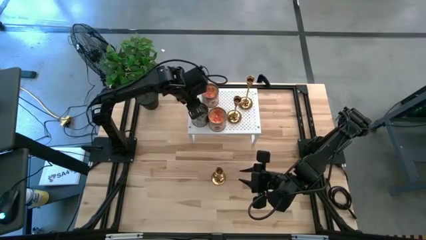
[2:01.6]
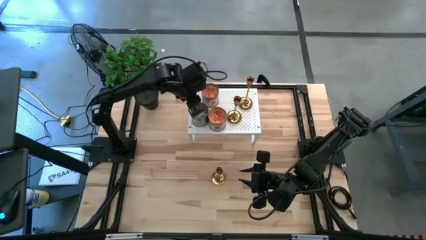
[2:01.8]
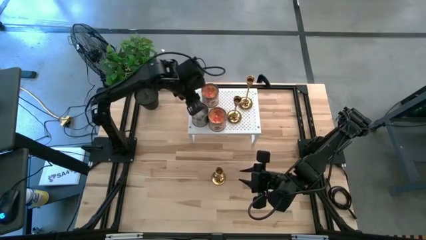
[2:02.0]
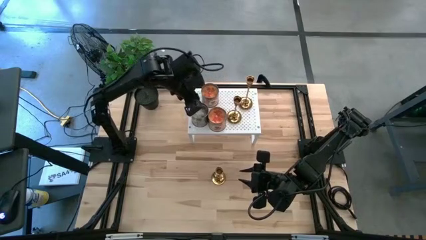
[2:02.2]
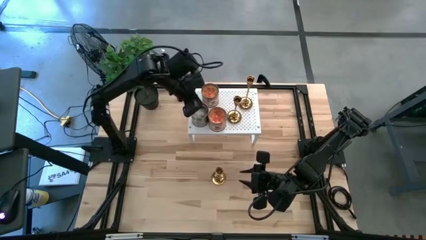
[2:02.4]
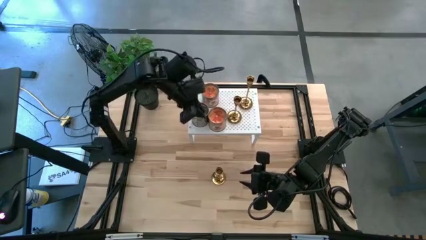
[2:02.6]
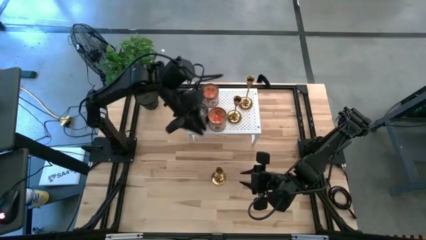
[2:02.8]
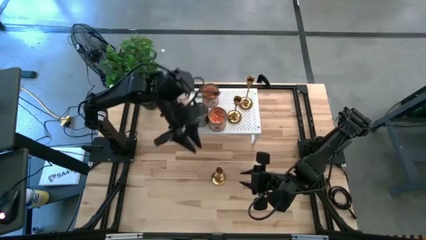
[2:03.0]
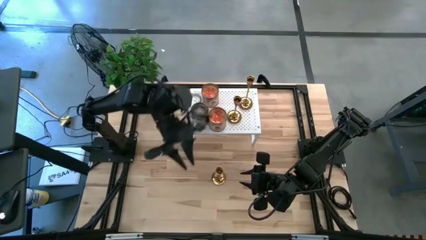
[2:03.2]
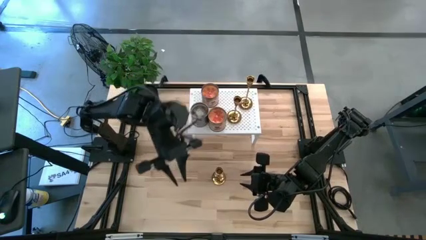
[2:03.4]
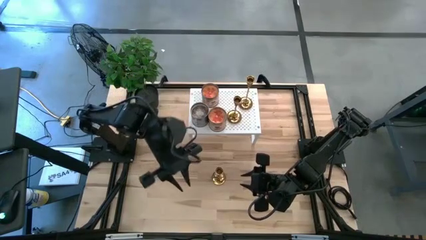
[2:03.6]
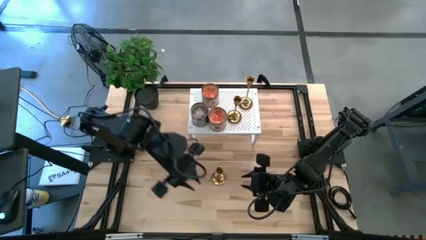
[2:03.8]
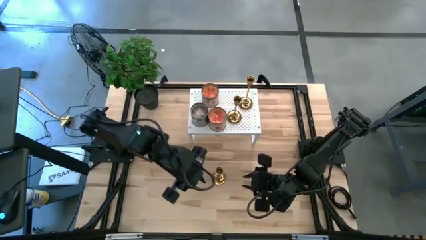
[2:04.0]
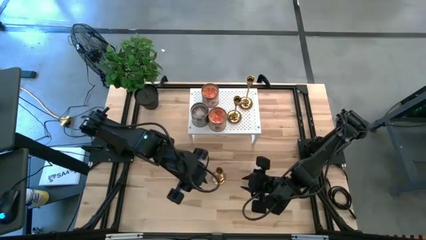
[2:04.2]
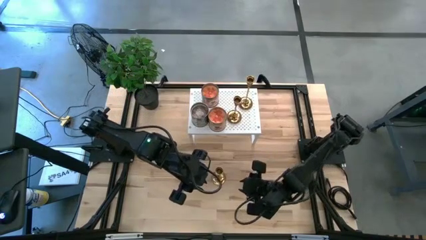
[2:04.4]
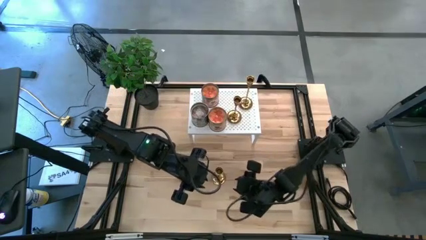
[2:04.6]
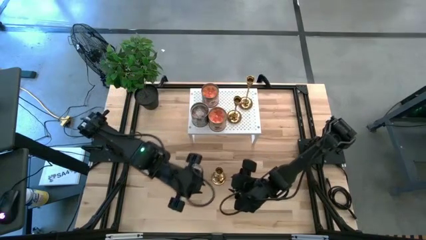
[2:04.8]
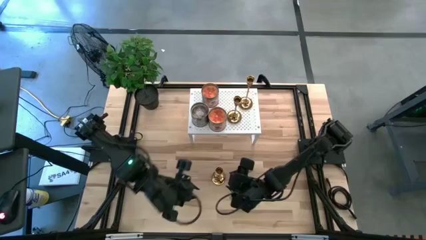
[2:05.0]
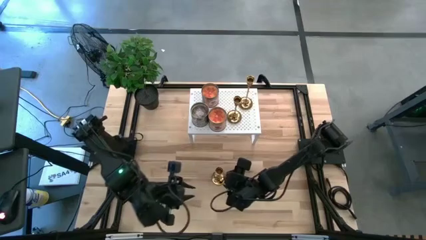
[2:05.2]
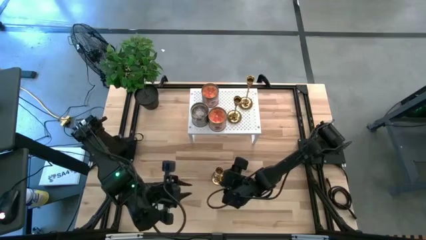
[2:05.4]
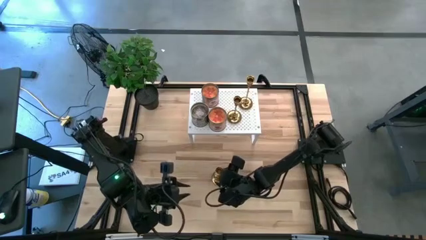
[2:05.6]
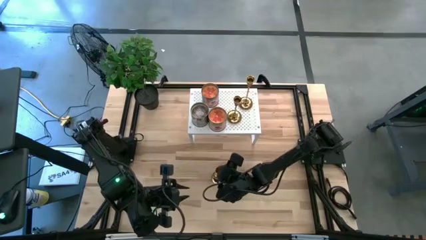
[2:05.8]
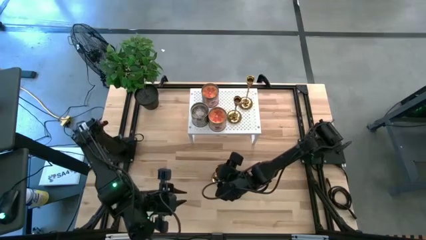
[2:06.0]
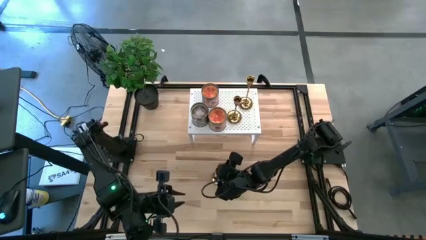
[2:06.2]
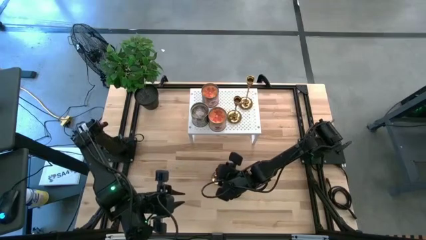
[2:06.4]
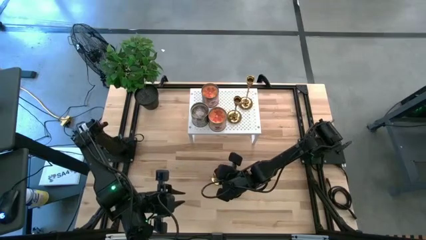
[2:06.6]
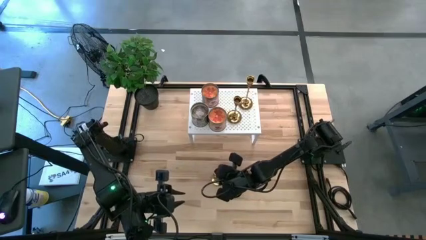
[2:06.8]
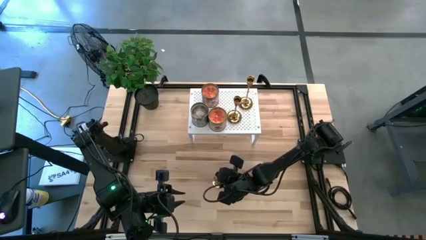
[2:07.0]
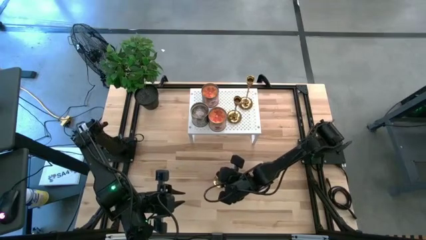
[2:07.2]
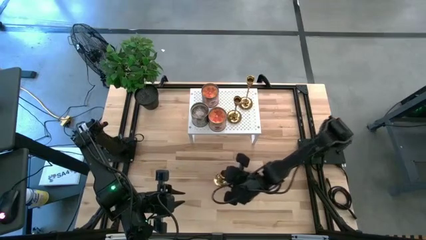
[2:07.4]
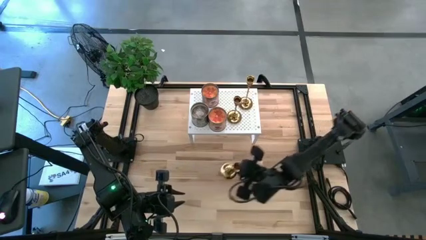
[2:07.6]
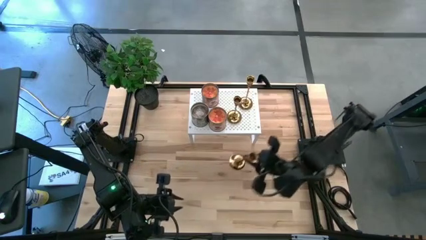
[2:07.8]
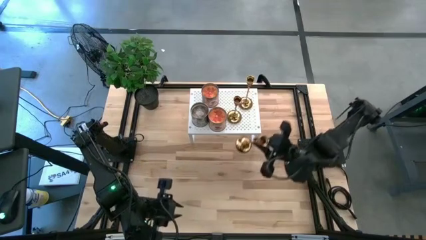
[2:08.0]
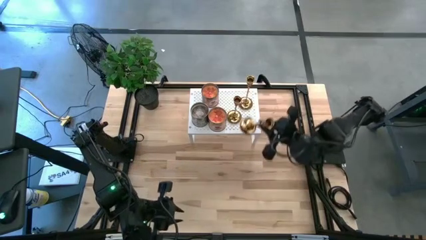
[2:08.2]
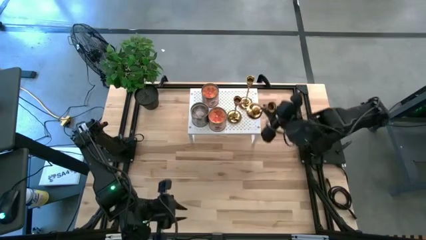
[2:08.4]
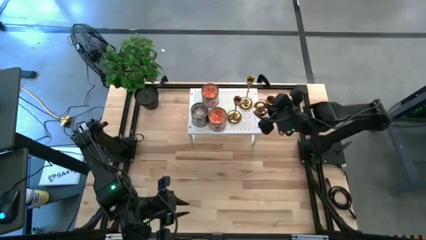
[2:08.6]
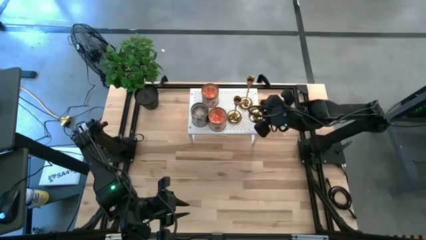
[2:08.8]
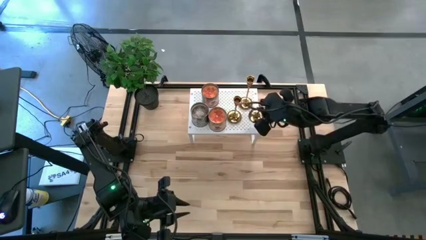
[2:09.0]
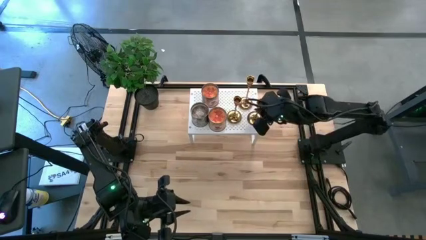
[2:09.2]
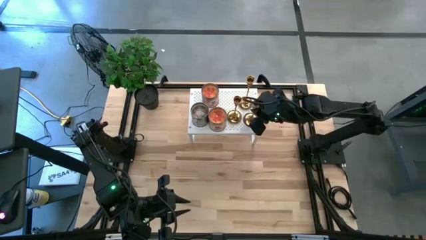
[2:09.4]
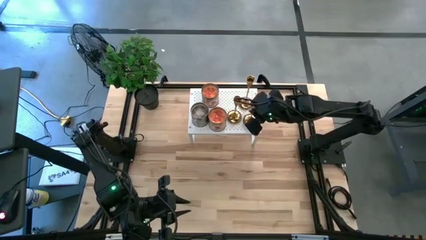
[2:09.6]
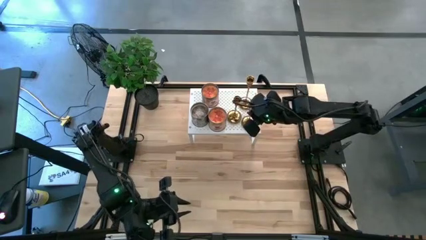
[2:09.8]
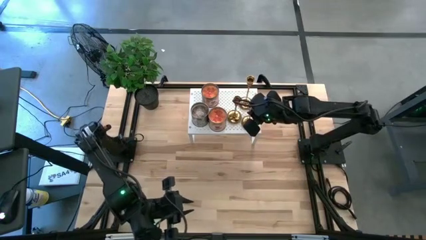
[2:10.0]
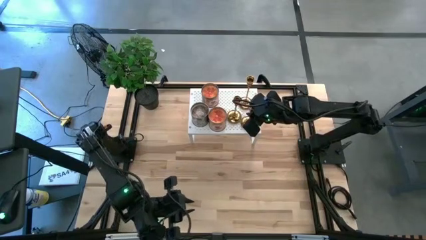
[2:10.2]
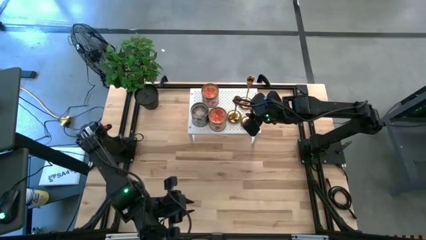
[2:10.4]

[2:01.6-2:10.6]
Task: Pick & Place candle stick holders
Put the gold candle holder on the shelf

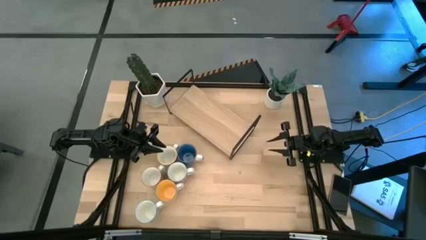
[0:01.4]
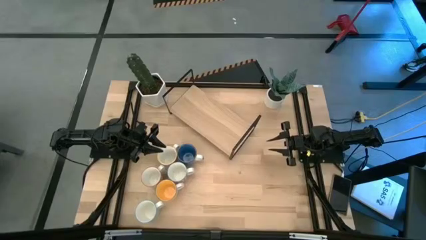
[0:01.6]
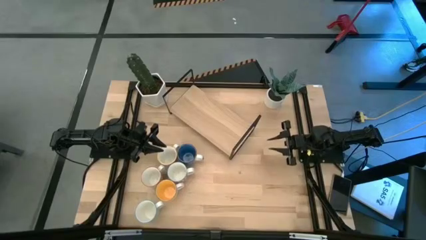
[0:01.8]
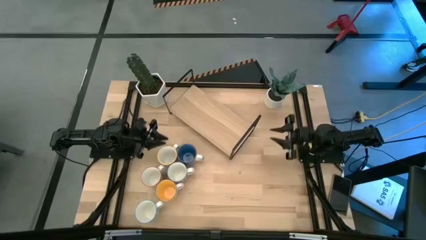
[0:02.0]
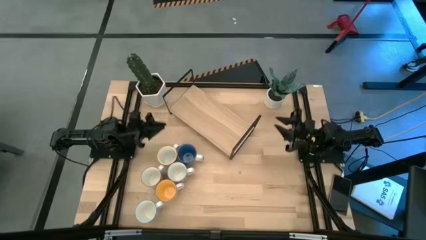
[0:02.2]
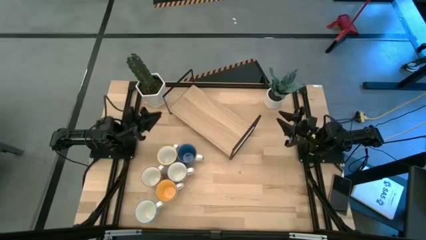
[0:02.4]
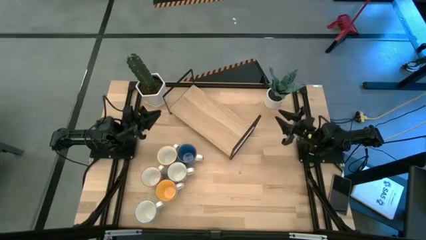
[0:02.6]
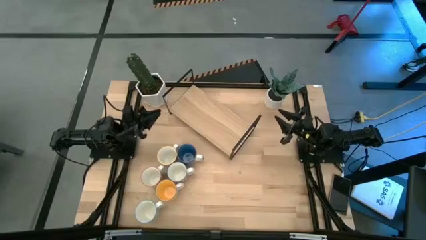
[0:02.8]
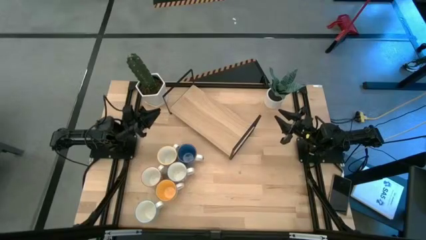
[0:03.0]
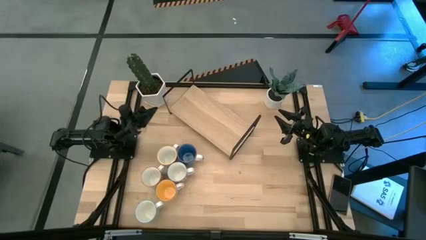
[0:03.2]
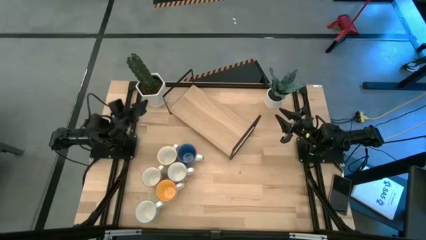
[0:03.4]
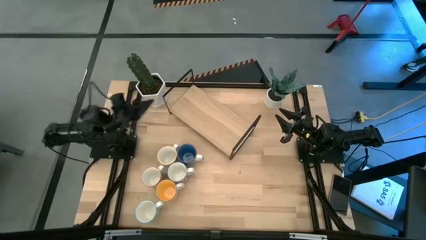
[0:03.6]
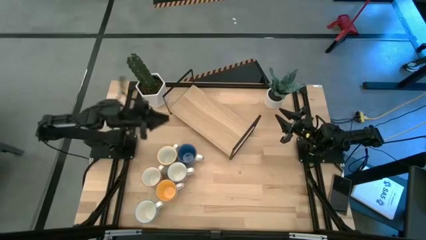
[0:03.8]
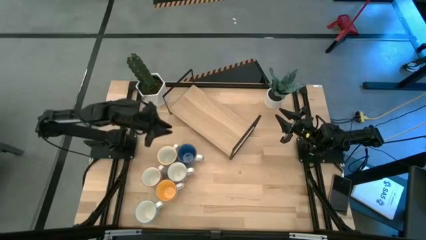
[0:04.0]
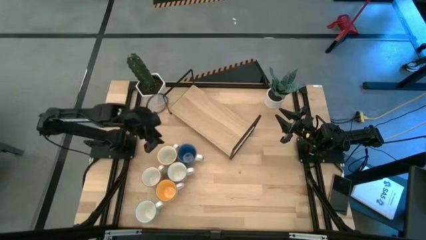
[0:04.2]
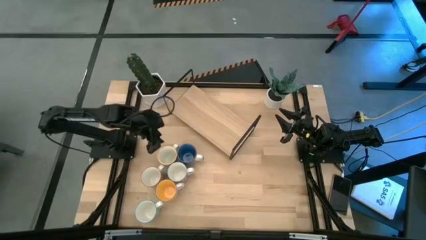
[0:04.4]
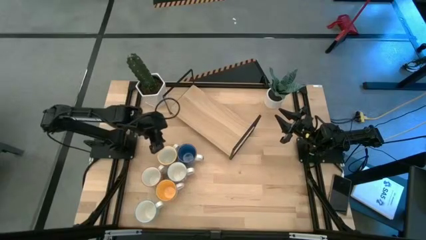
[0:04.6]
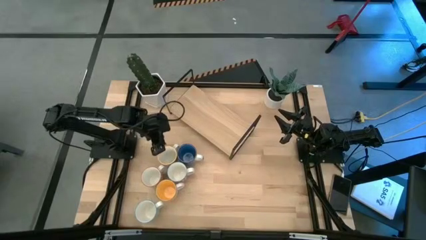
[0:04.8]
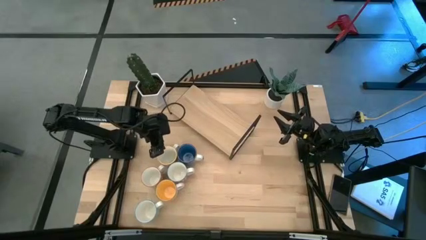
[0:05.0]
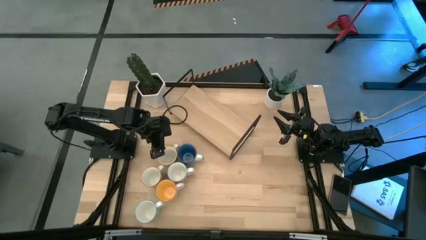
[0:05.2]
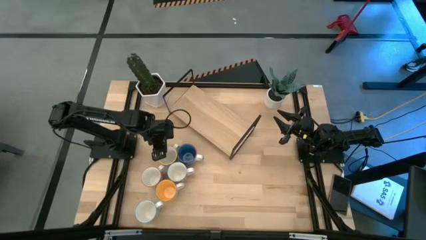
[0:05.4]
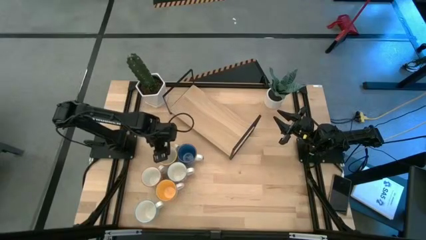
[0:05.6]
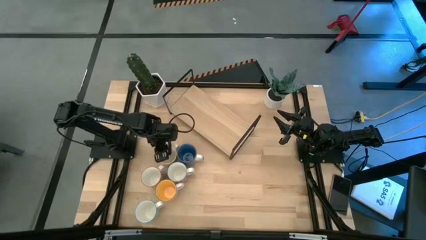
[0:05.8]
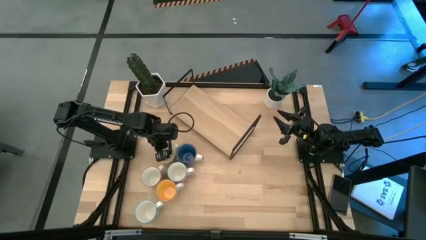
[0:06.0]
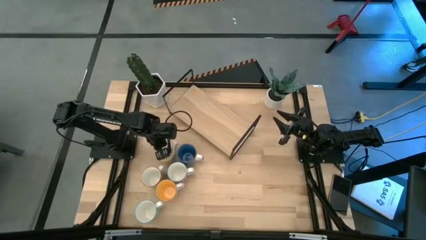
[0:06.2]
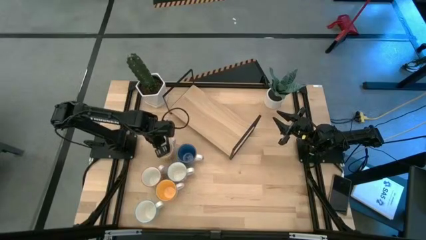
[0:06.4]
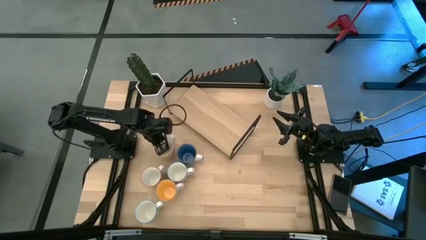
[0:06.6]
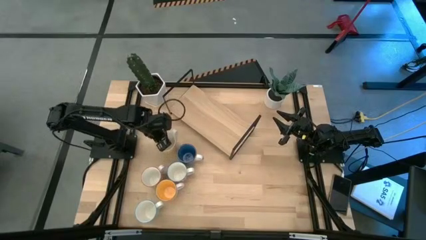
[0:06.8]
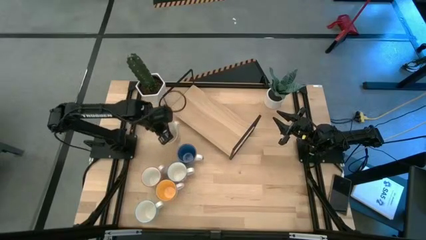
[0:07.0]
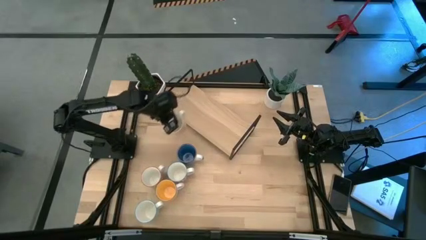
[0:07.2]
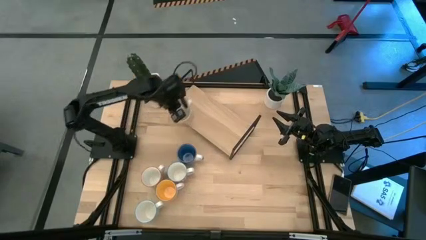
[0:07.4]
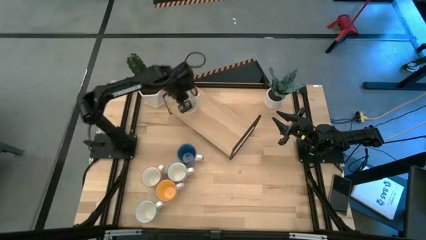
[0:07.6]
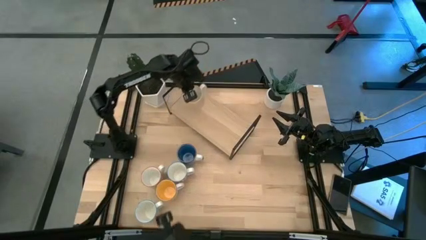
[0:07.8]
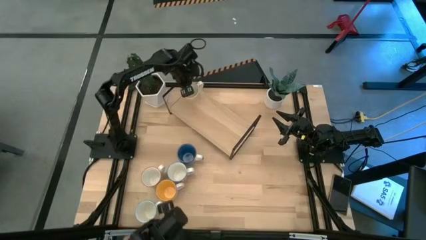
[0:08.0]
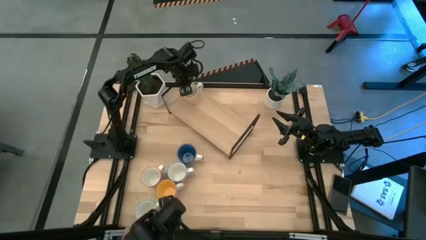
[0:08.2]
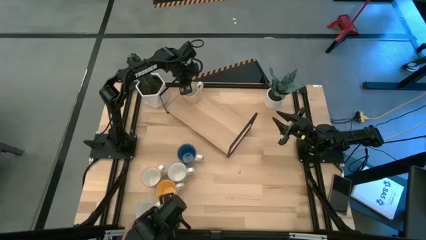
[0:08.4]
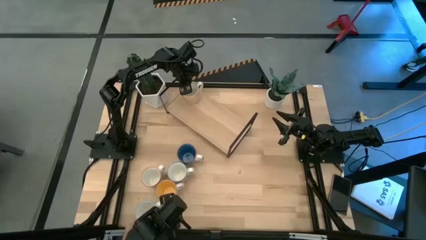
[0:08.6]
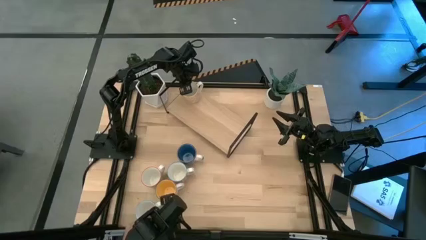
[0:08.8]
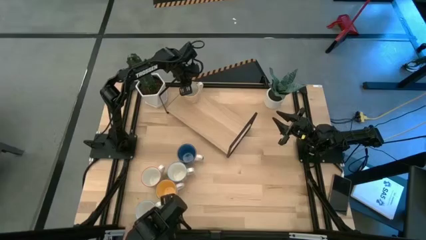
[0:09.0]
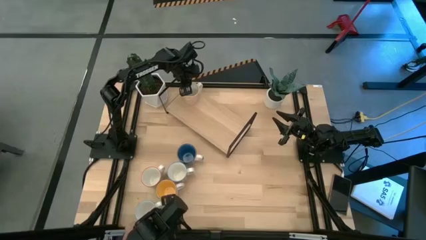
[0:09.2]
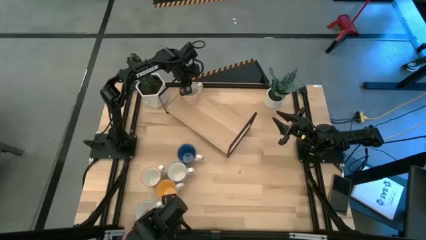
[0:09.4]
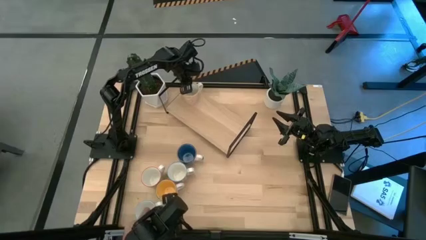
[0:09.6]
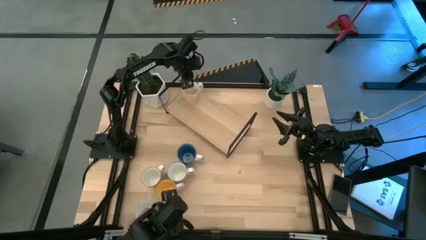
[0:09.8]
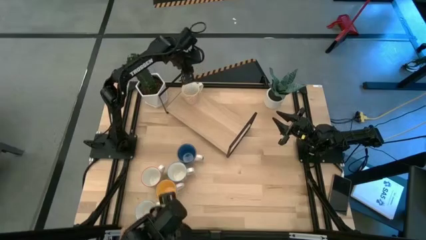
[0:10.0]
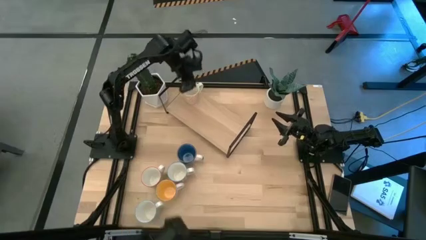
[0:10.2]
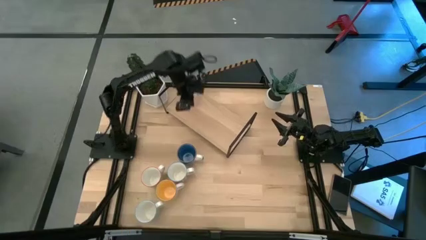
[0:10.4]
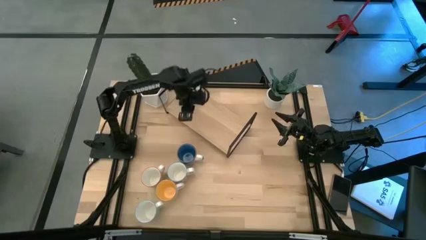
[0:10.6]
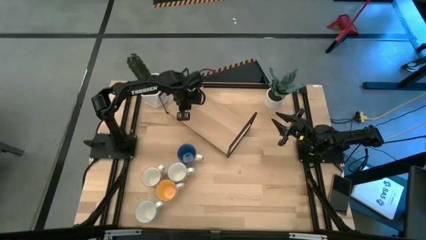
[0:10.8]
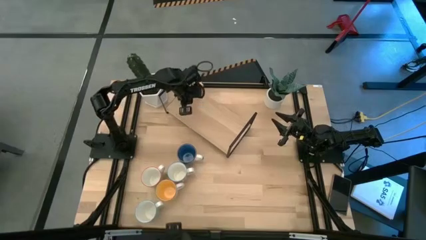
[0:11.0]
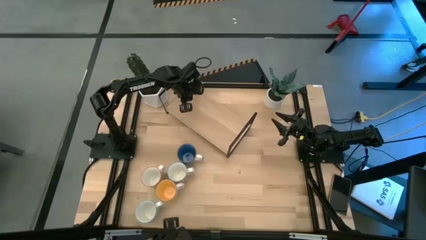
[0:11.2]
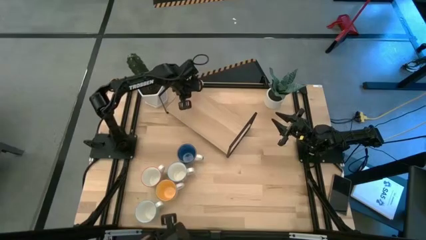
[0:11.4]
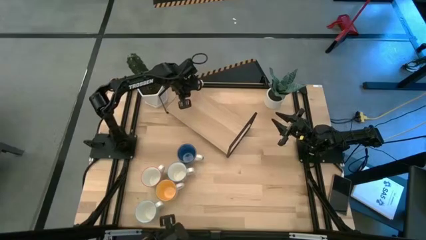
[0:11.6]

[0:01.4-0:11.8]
Task: Place coffee mugs
Put the orange patterned mug on the shelf
